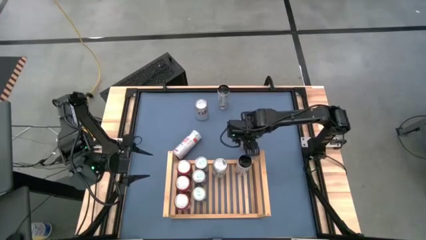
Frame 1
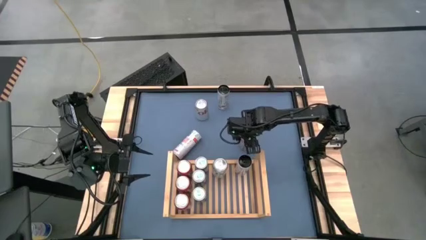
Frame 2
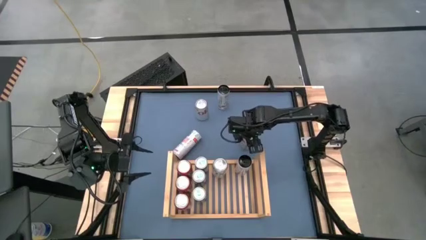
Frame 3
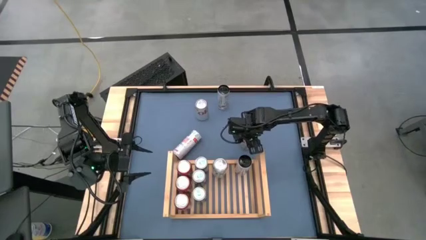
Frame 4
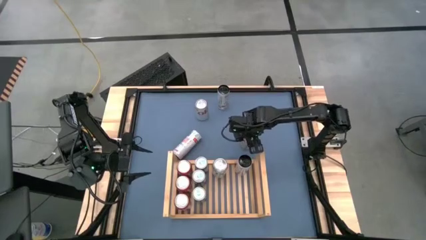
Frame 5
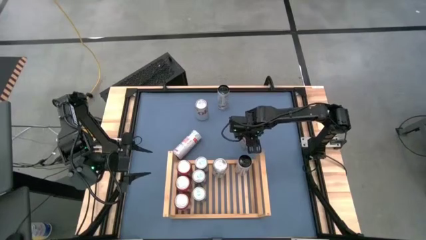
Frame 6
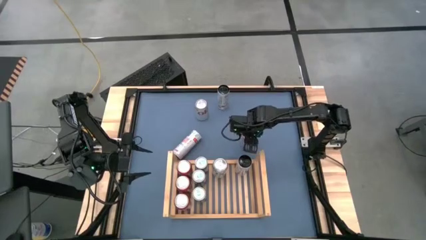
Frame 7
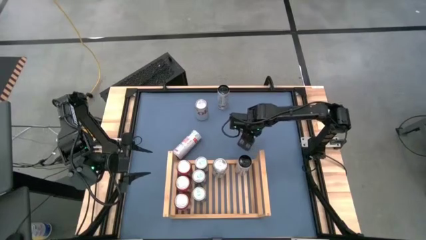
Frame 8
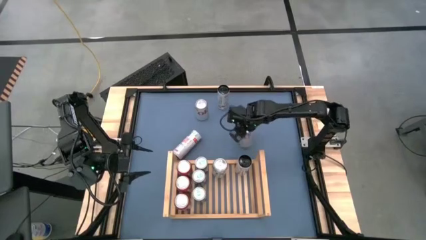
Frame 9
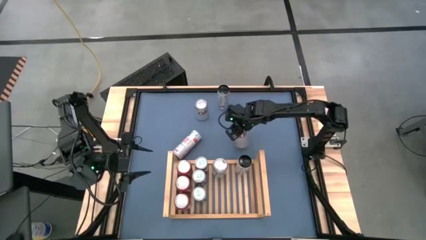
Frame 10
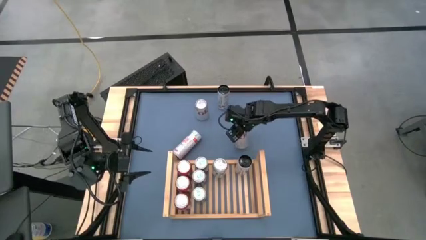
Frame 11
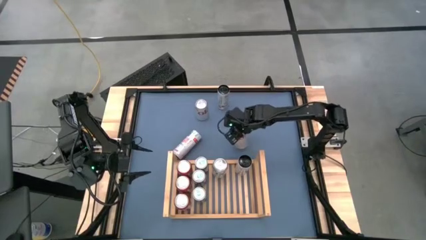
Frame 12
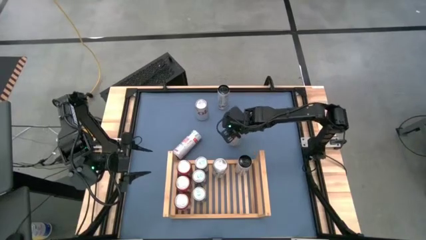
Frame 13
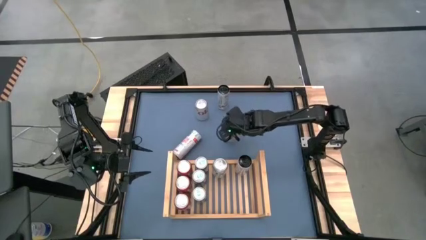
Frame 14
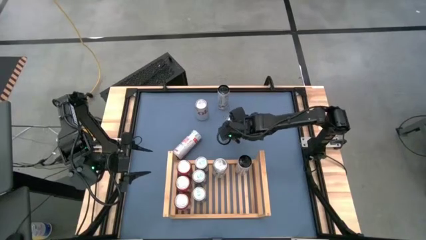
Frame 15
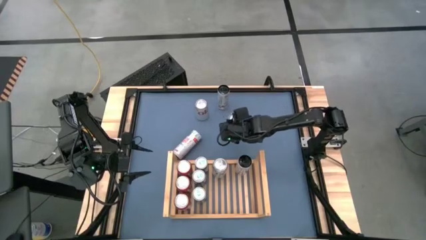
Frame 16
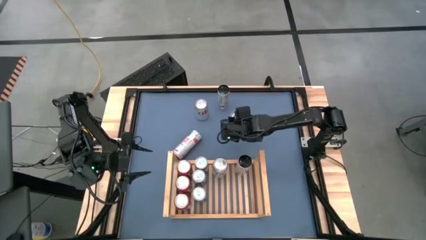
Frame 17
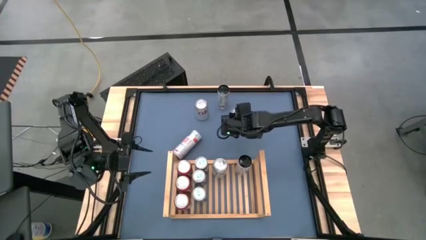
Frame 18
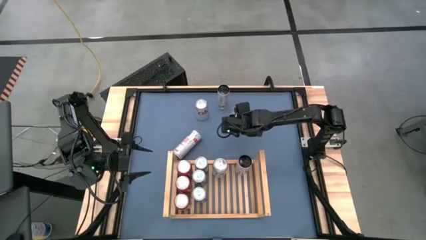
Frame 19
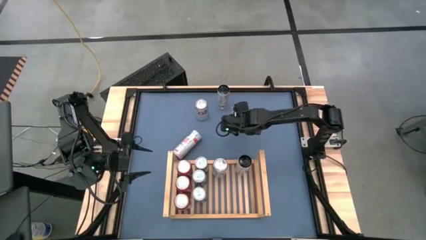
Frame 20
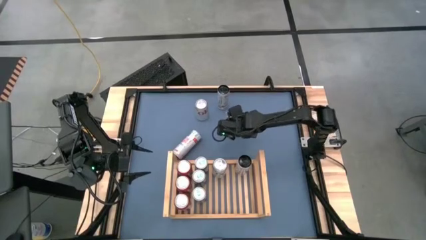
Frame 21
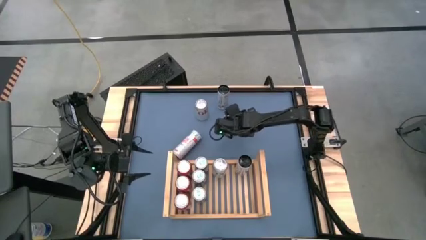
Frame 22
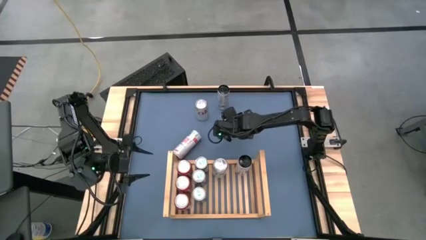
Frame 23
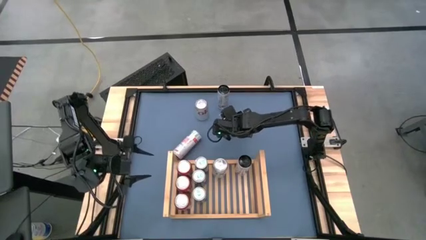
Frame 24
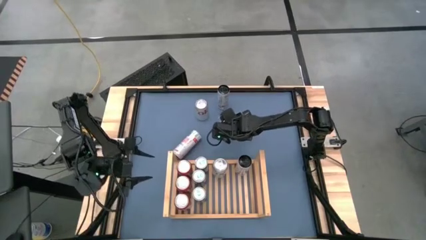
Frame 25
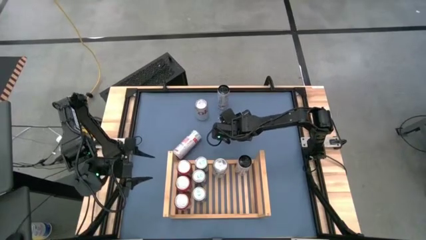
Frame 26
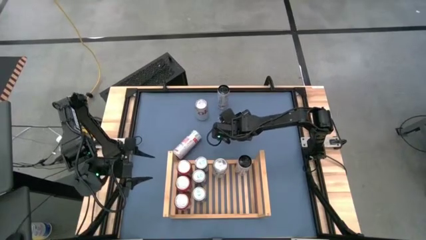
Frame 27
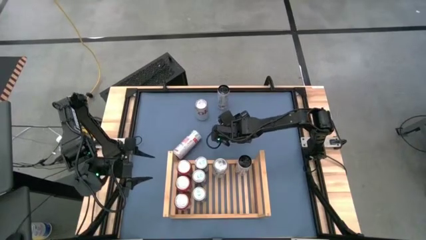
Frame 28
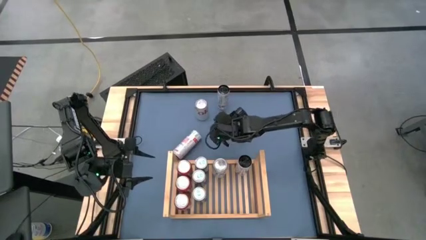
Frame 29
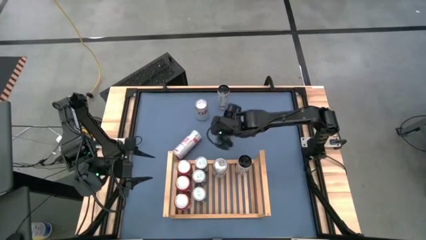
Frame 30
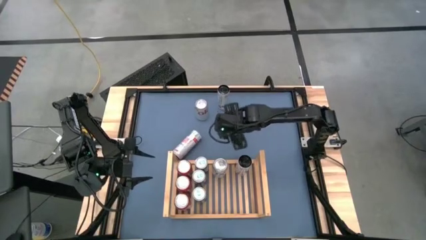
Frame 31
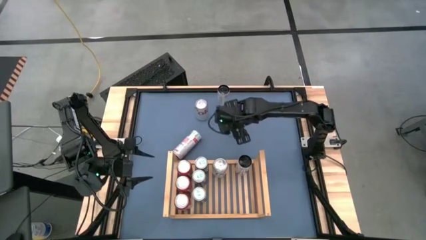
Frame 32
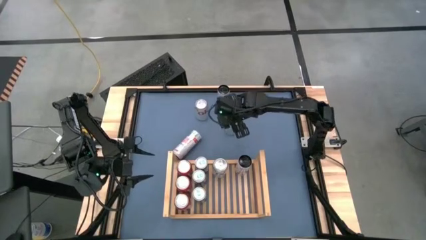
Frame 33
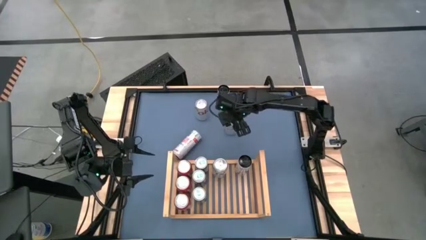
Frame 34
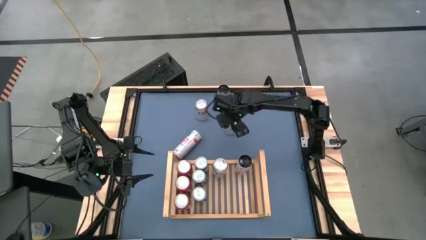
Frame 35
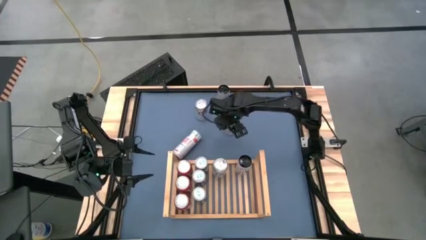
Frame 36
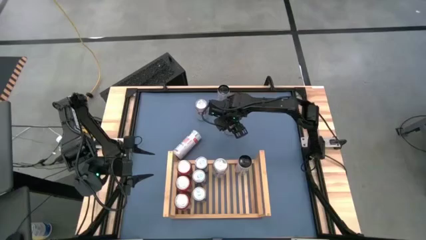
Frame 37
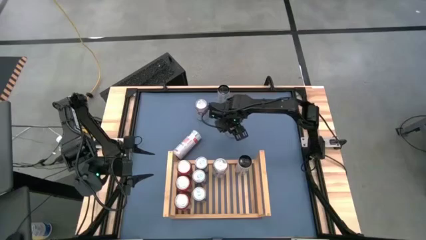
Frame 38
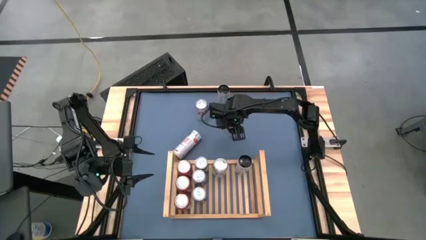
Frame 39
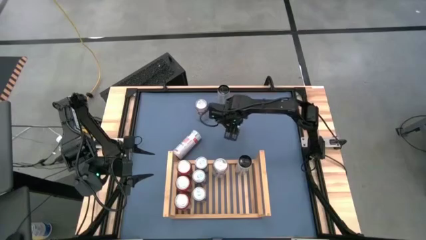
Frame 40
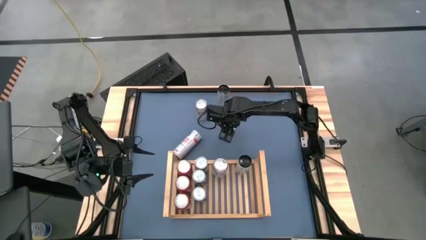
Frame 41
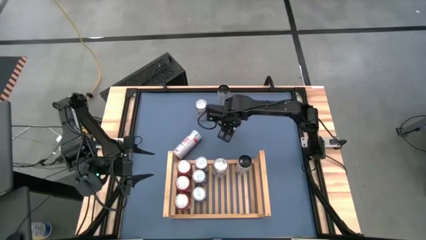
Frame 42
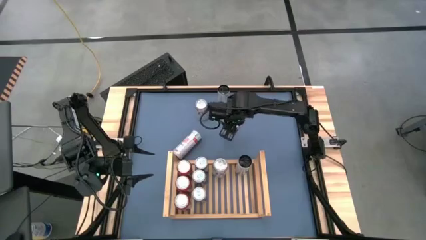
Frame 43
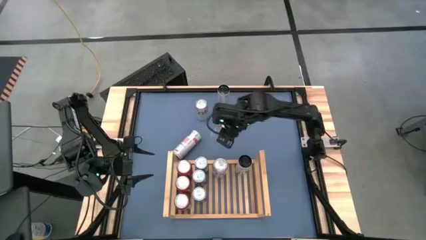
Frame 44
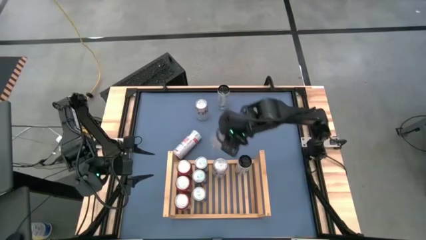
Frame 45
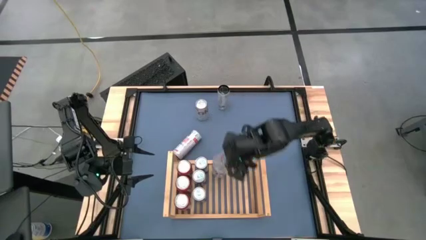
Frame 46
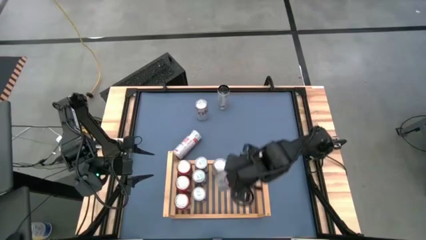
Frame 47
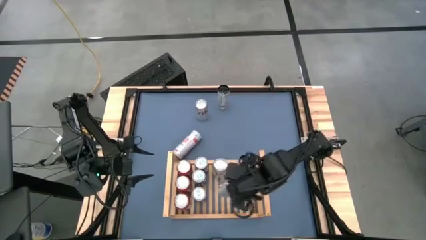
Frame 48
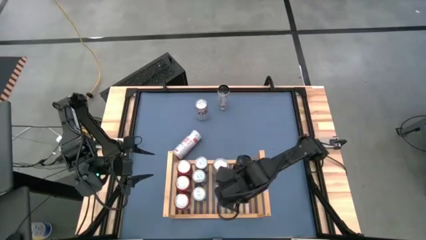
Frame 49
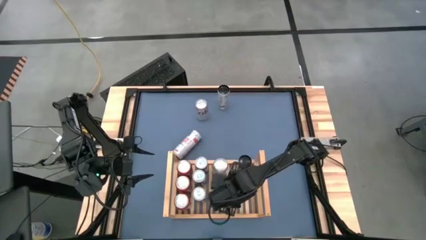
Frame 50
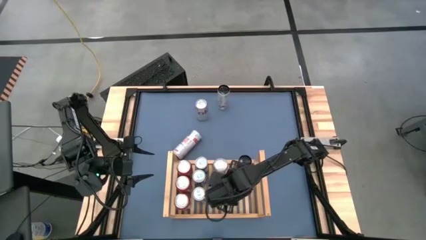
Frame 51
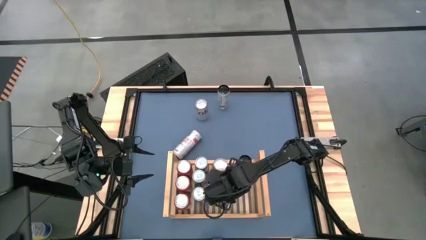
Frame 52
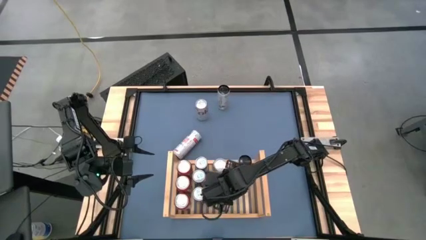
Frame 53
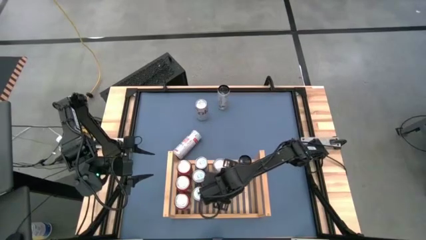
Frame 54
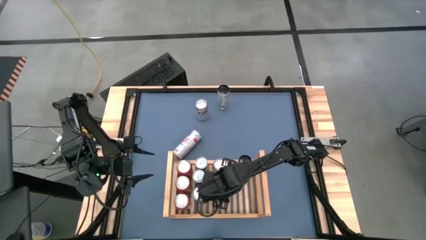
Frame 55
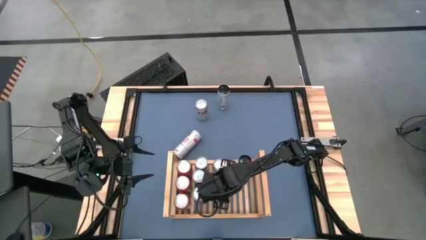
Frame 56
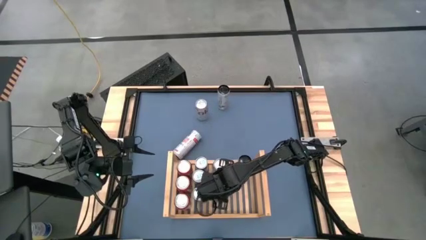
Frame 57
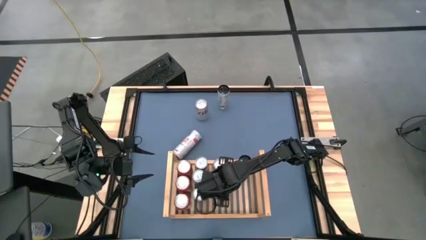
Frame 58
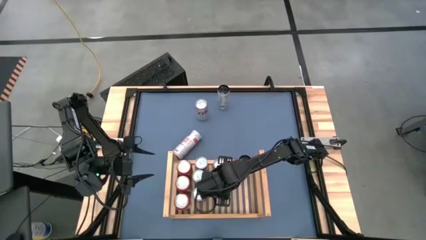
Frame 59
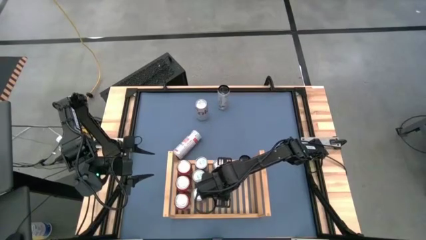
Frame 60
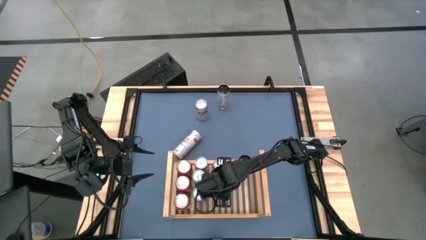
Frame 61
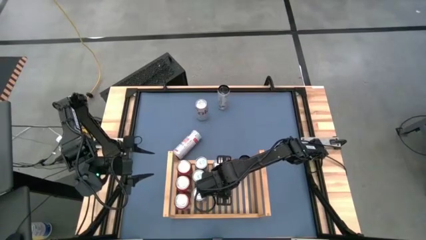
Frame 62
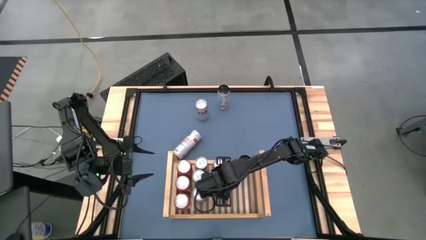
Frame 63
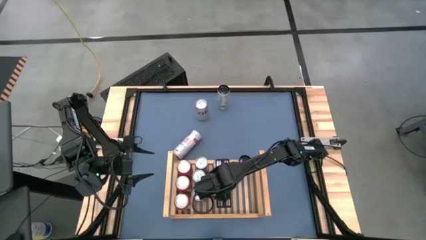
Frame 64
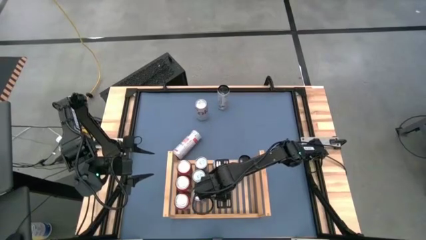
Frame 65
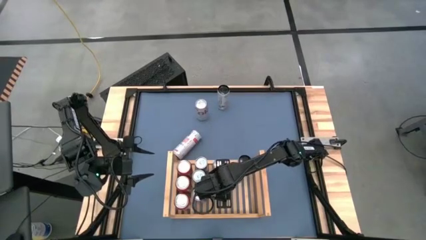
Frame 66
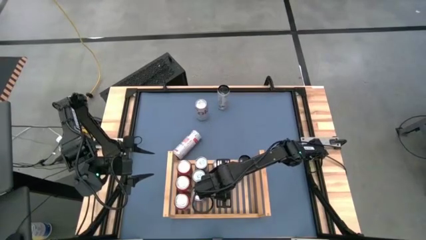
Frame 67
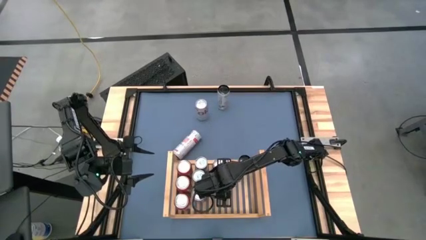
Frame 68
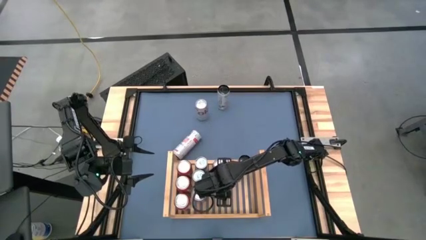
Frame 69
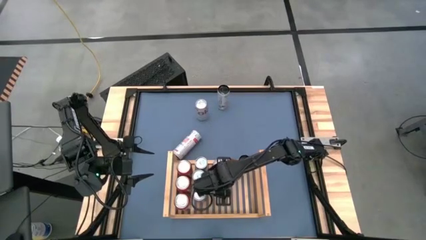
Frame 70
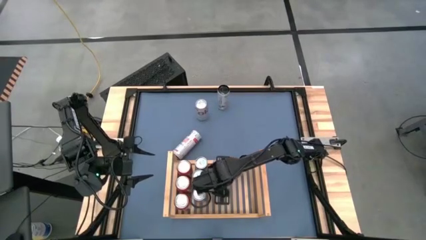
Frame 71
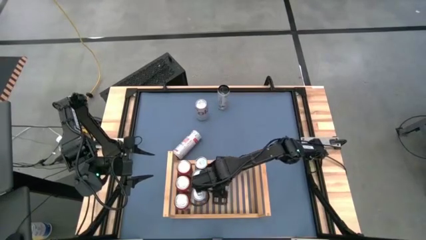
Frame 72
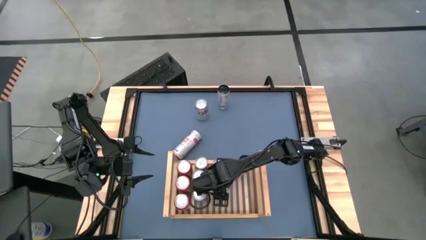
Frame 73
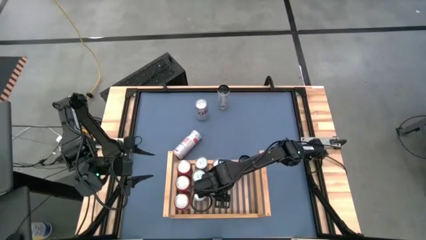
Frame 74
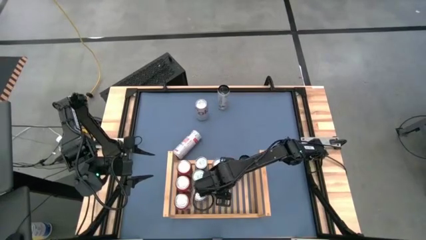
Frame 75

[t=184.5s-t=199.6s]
Task: Place canned beverage on shelf
Put the bottom white-pink soda can on the shelf aligned with the other white-pink soda can

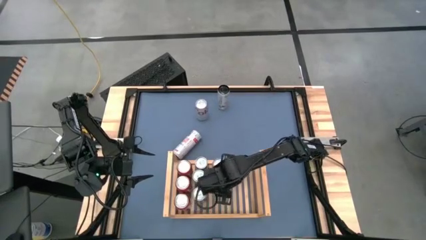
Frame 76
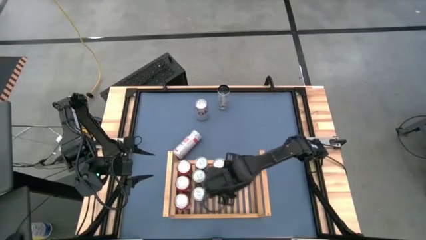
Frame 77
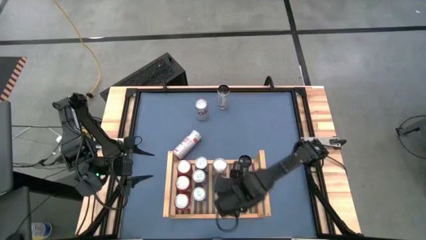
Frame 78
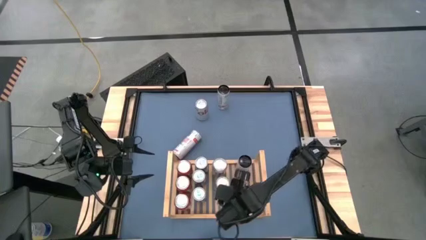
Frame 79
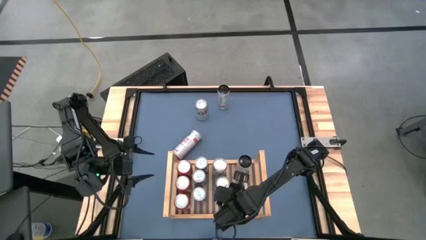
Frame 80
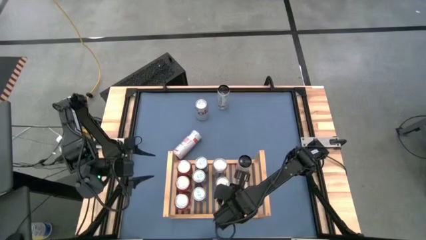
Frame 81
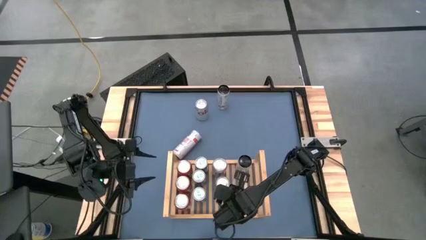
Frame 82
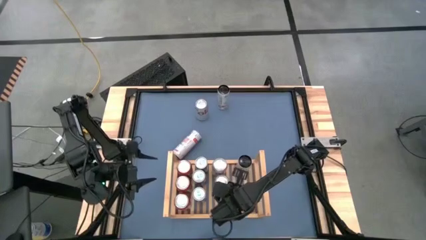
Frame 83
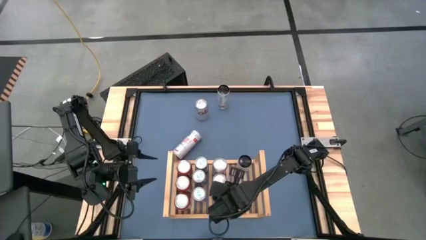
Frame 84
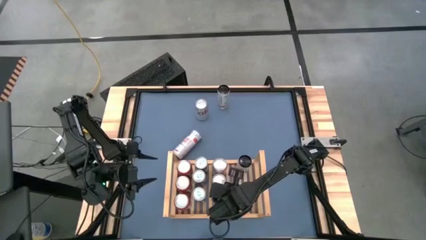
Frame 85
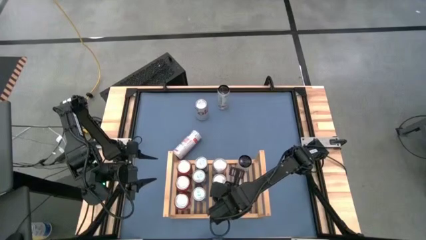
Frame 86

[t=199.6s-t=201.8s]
Adjust the white-pink soda can on the shelf
